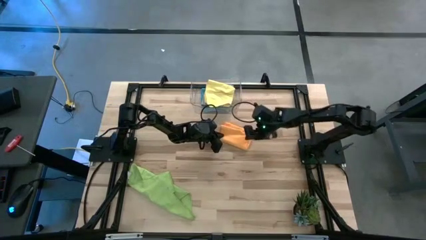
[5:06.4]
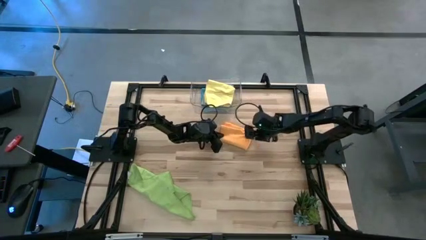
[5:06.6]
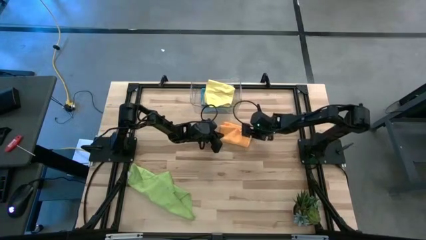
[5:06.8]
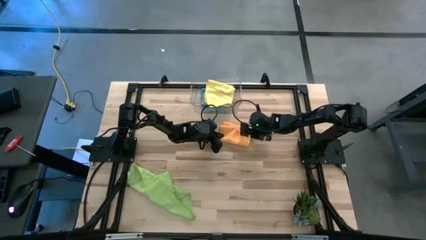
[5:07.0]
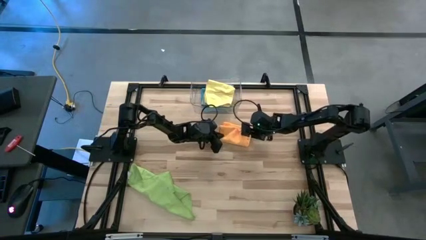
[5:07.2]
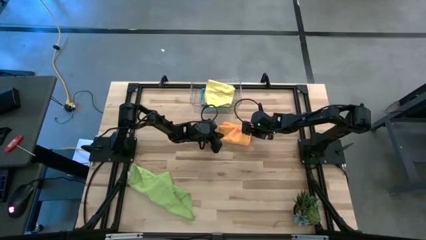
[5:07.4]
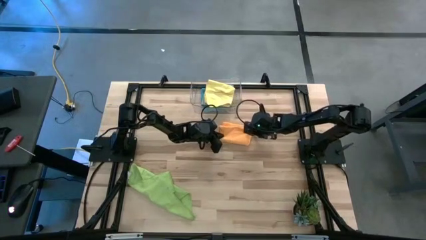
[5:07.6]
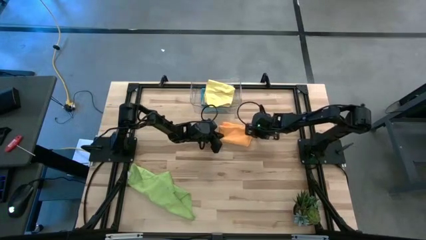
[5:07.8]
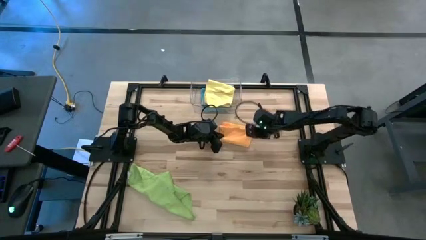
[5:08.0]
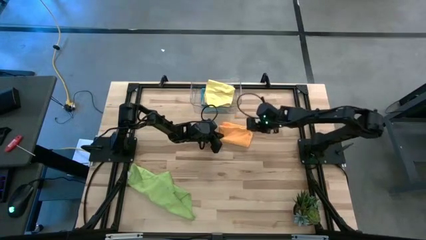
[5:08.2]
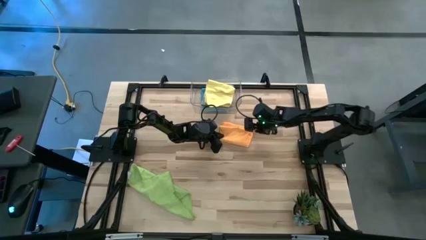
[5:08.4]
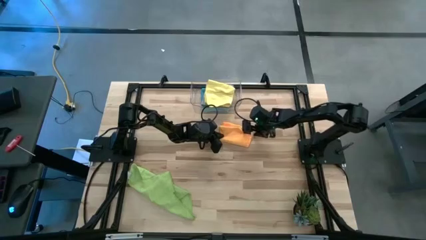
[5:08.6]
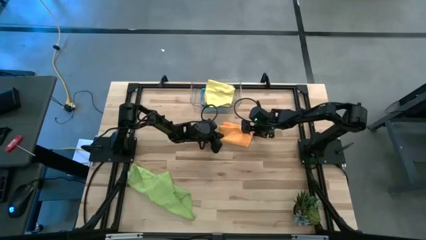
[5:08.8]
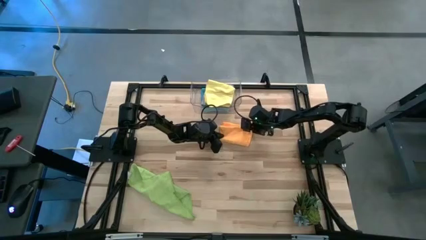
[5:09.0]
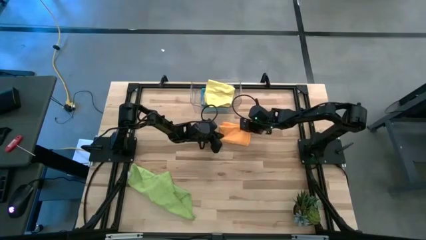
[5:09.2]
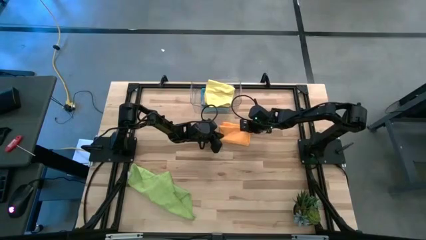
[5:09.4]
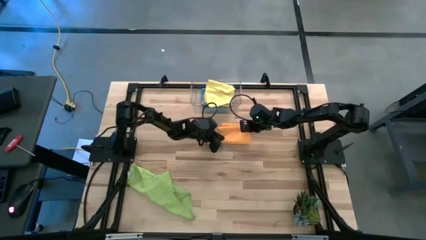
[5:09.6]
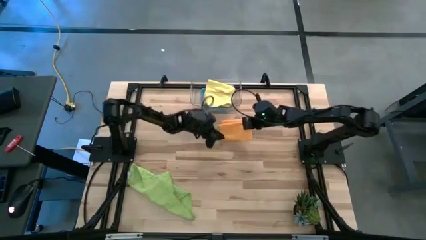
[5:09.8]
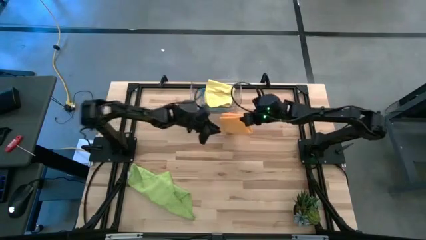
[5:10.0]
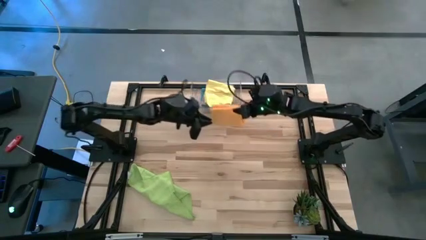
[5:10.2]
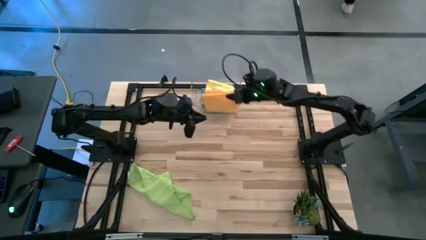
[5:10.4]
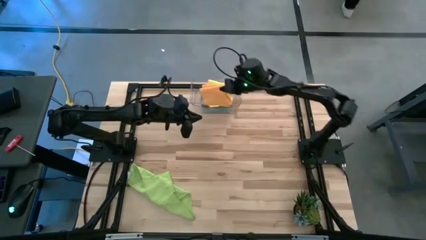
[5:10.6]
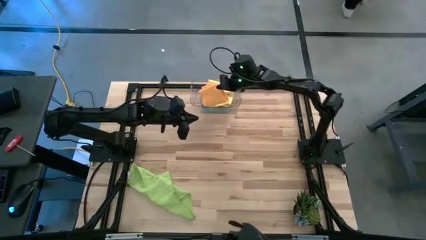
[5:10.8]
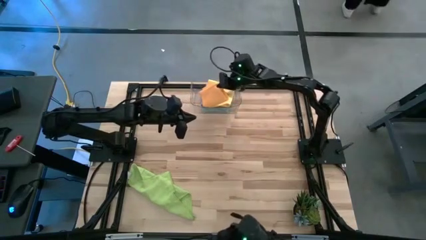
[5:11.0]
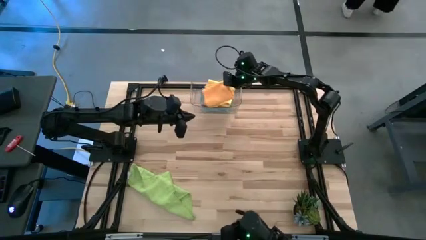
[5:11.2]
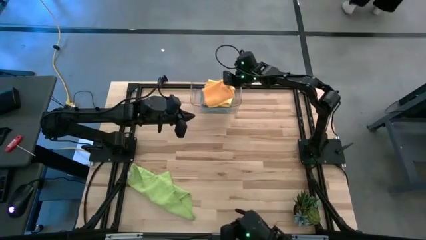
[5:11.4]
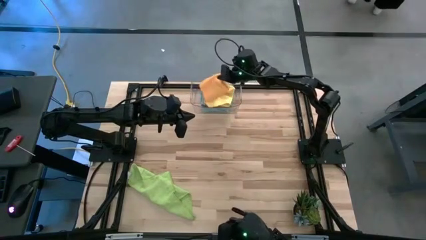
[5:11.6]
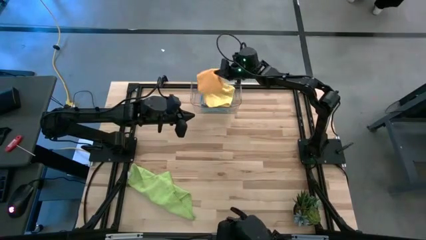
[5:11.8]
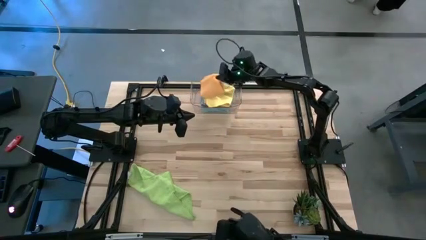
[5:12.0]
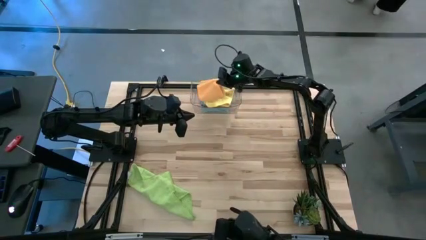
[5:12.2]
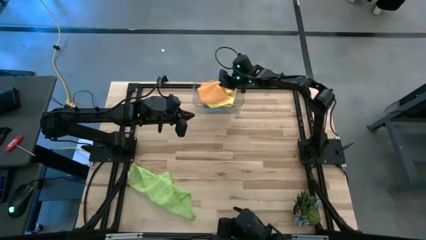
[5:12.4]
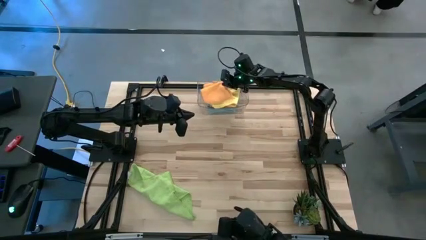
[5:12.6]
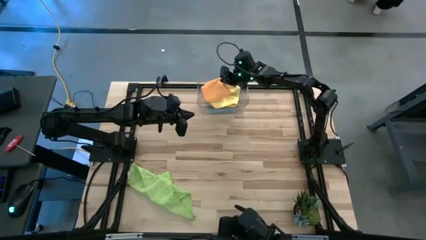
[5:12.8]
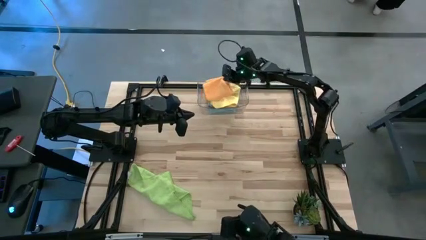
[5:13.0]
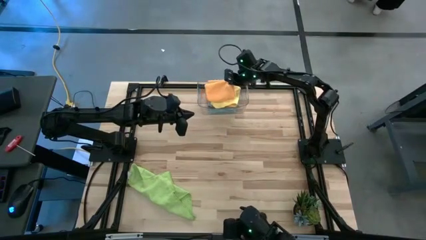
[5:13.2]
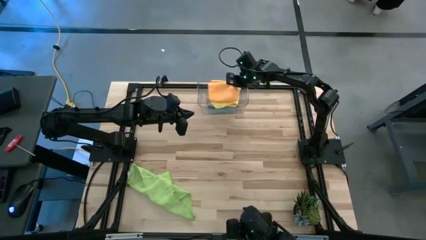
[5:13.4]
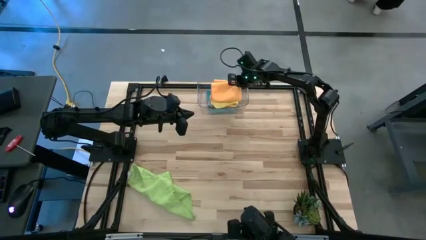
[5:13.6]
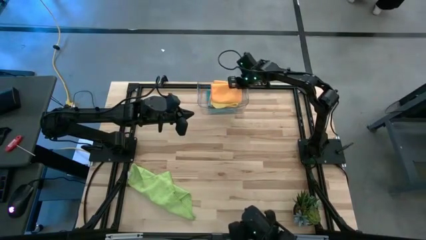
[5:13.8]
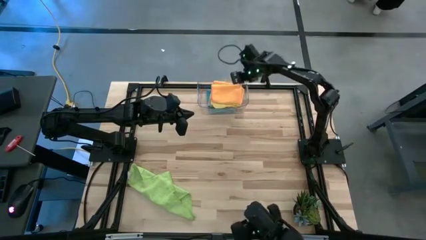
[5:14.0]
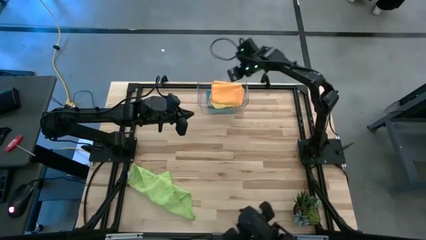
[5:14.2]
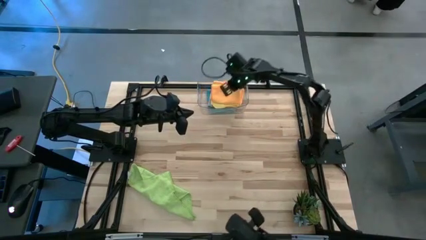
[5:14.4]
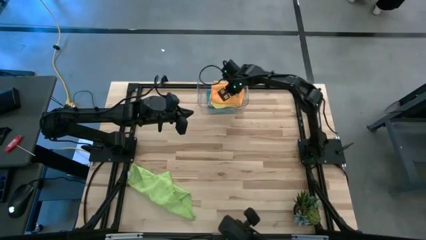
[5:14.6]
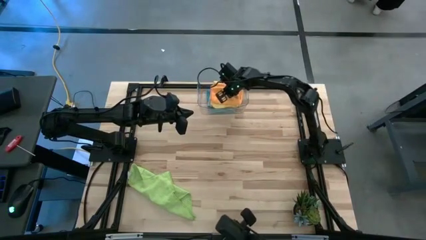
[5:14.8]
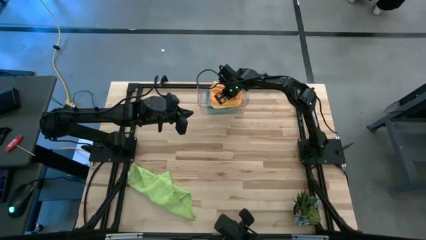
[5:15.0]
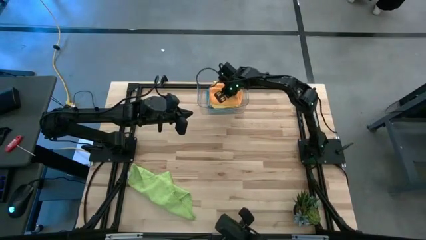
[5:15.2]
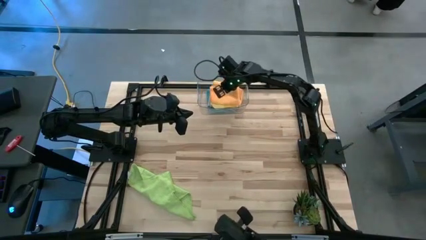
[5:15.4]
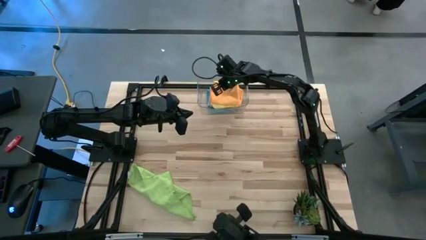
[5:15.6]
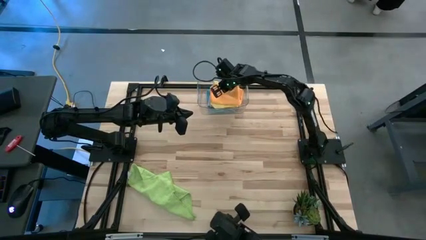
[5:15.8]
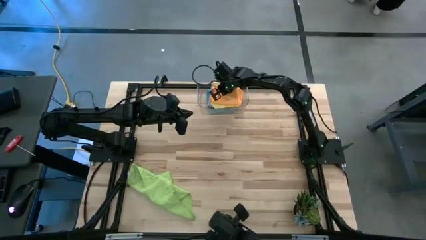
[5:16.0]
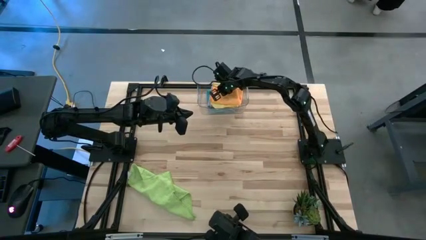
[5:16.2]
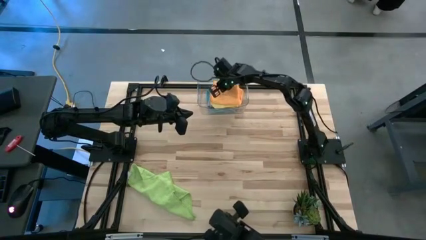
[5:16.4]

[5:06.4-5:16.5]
Task: Fold microfiber towels
Put the orange towel into the transparent bin

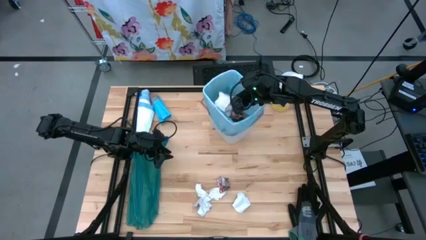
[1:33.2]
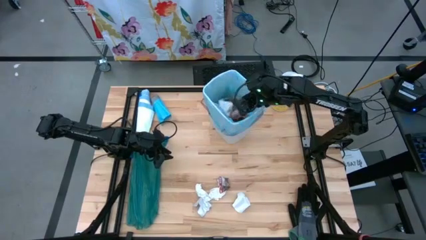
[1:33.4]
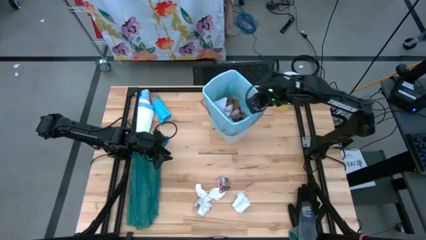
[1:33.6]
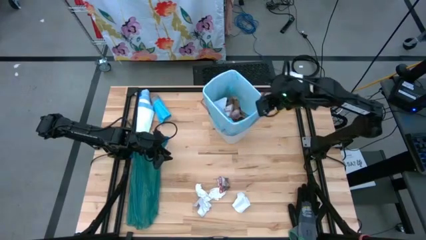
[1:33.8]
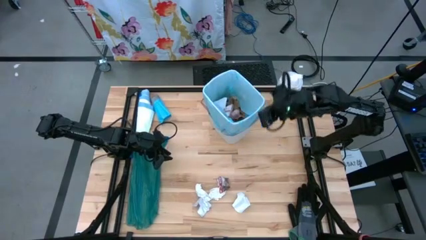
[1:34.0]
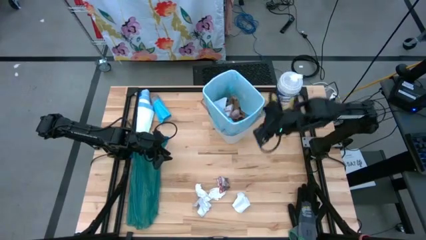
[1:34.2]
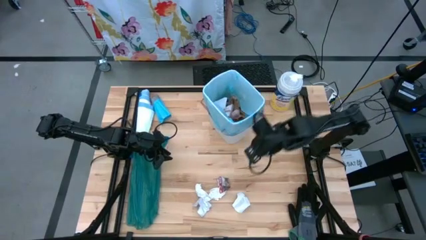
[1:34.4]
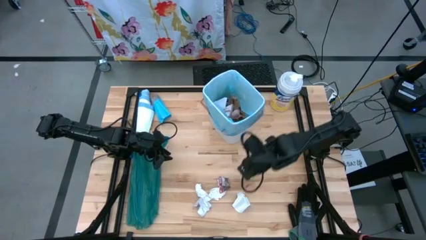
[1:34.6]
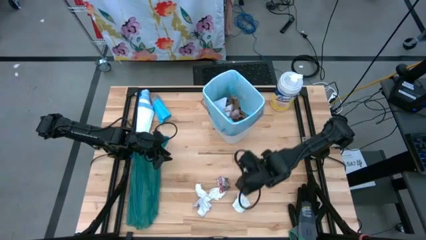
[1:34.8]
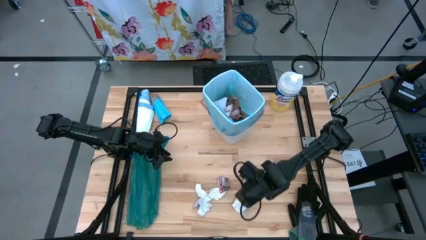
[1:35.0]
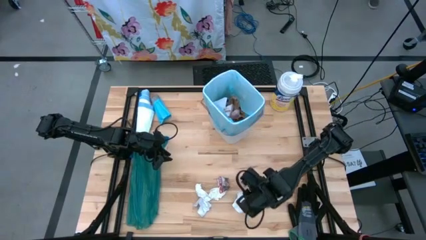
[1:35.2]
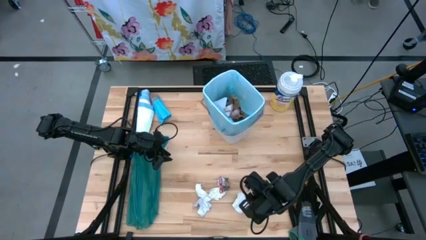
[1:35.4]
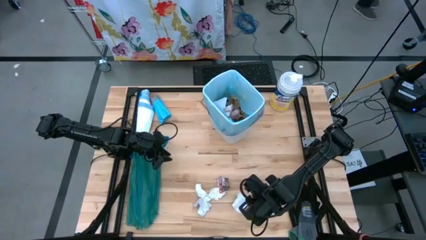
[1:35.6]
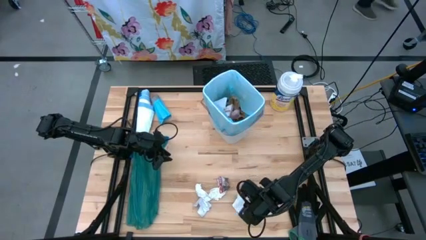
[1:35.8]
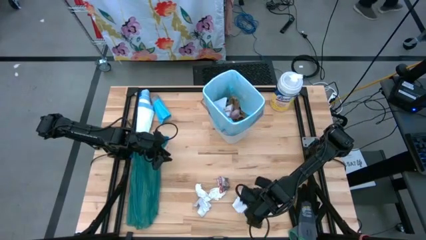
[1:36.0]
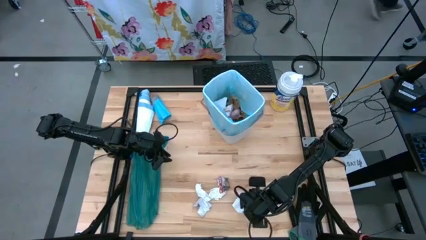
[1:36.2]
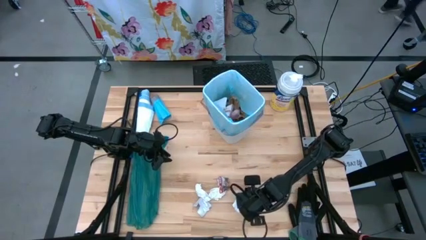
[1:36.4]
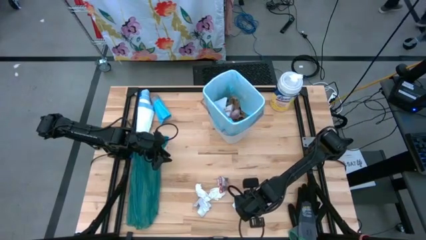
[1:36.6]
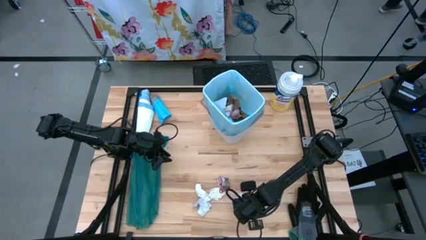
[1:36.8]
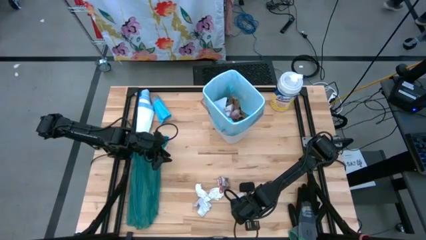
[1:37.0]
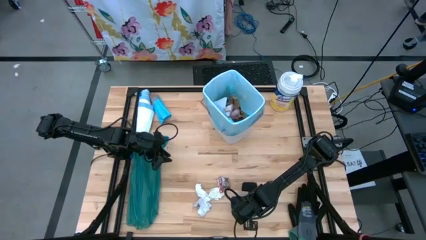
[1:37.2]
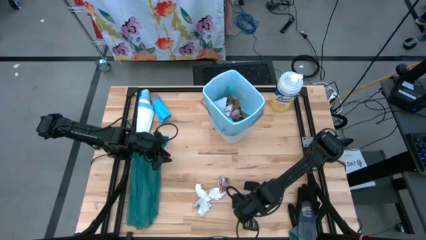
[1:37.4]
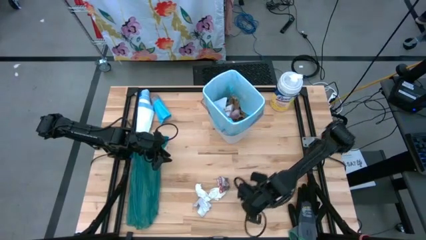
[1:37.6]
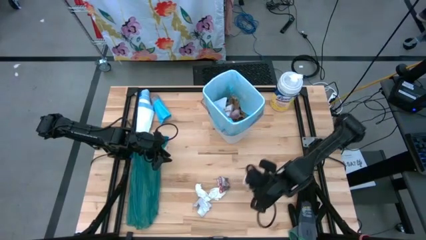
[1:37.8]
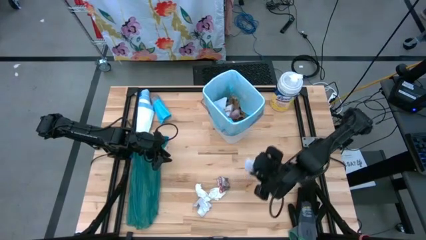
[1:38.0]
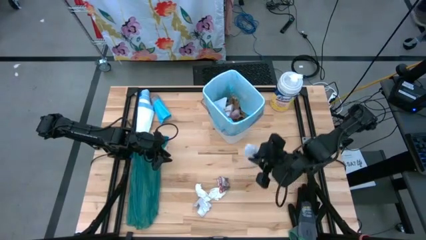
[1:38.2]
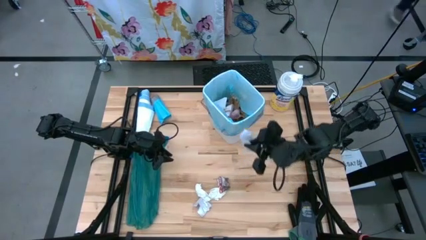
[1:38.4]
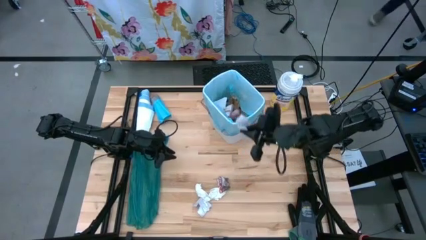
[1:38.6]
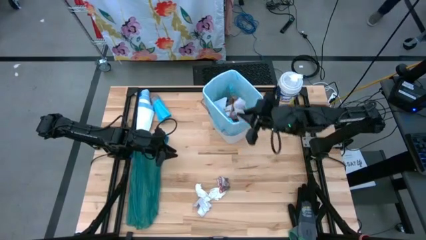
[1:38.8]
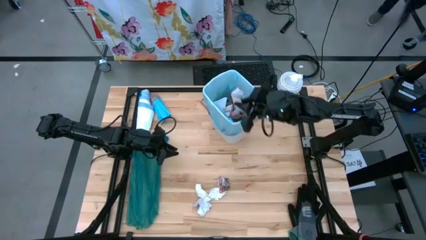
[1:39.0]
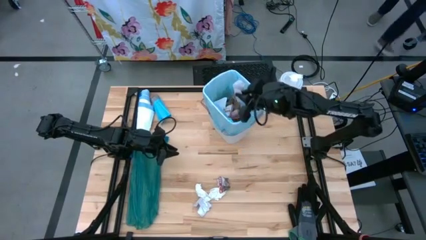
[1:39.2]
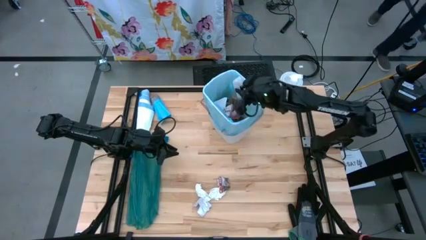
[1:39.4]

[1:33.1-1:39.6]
Task: place trash/remove bag and relplace
Put the white paper into the trash bin
